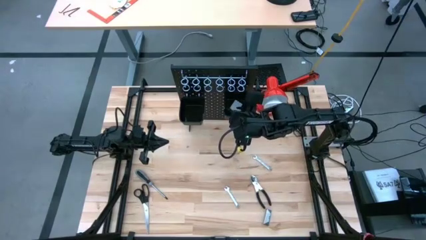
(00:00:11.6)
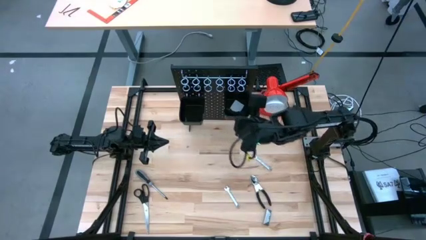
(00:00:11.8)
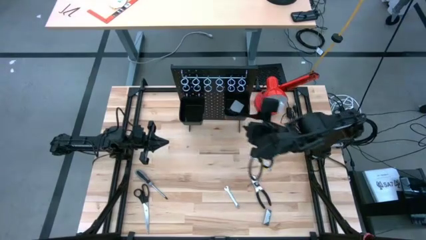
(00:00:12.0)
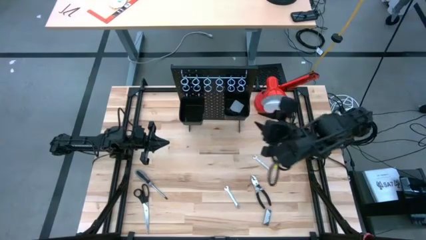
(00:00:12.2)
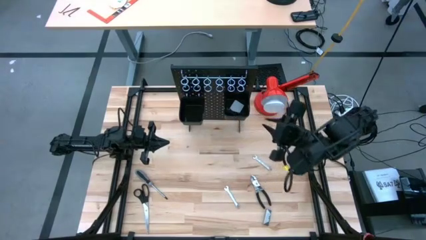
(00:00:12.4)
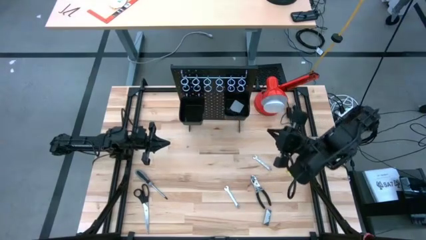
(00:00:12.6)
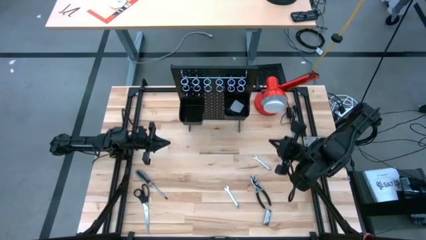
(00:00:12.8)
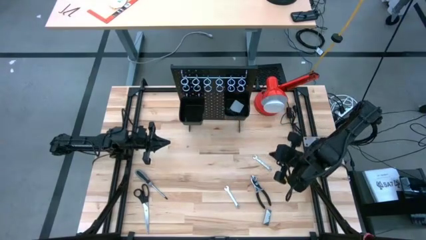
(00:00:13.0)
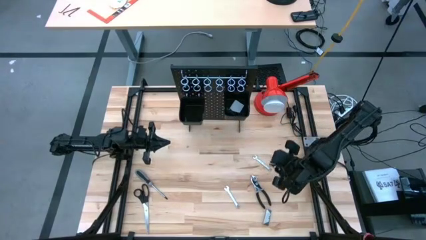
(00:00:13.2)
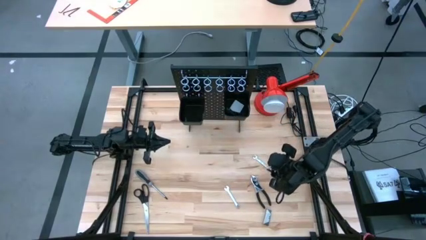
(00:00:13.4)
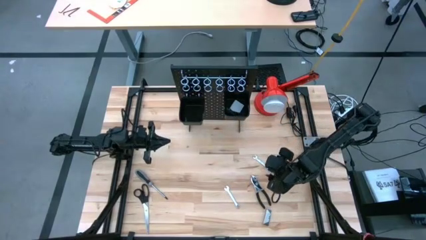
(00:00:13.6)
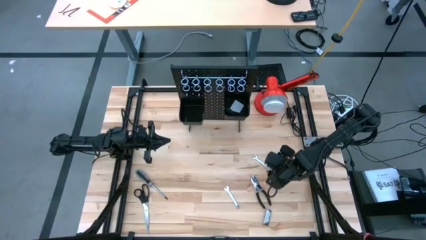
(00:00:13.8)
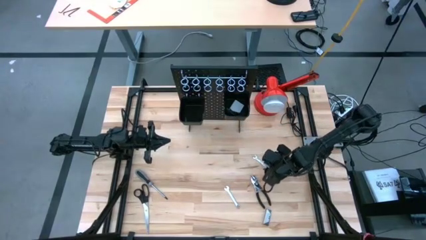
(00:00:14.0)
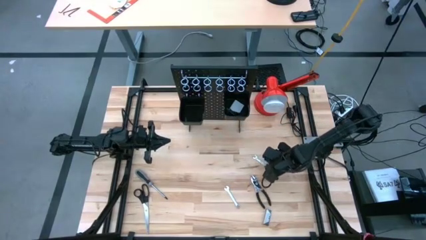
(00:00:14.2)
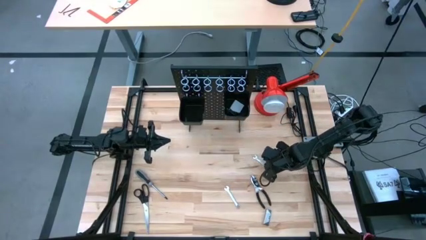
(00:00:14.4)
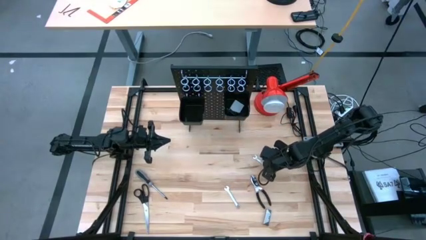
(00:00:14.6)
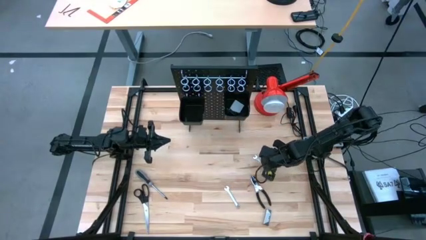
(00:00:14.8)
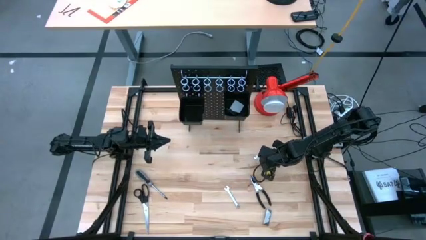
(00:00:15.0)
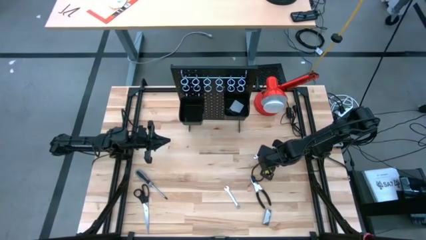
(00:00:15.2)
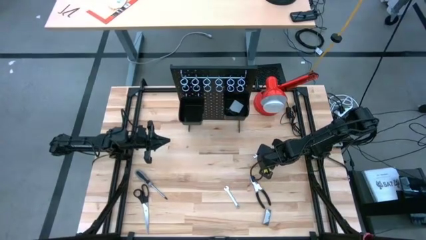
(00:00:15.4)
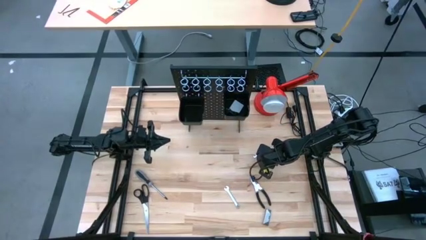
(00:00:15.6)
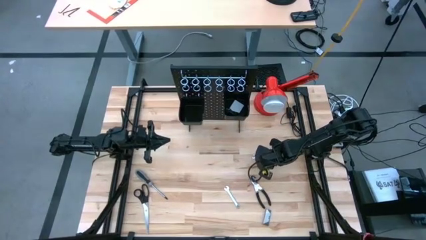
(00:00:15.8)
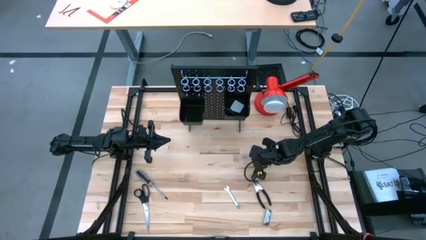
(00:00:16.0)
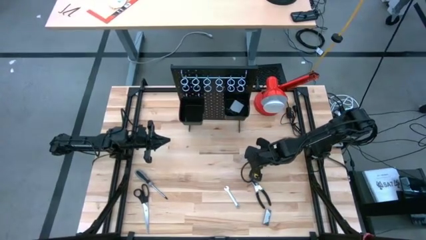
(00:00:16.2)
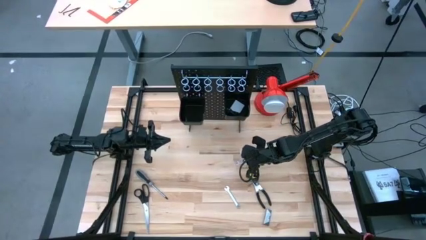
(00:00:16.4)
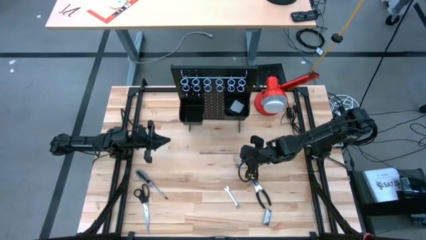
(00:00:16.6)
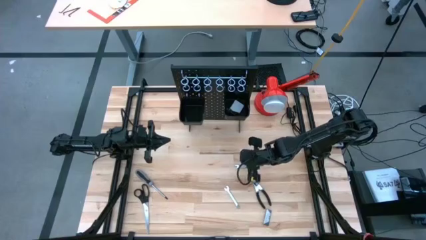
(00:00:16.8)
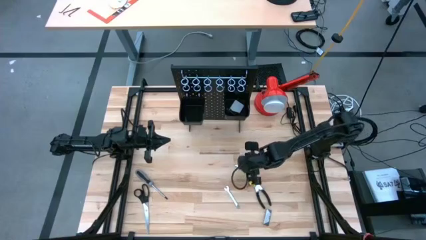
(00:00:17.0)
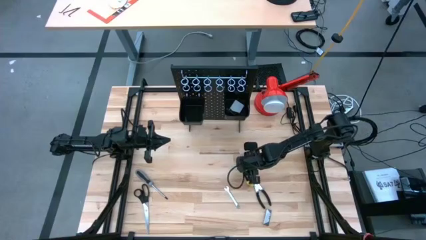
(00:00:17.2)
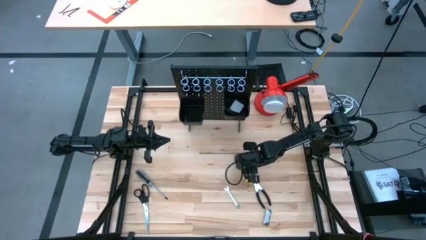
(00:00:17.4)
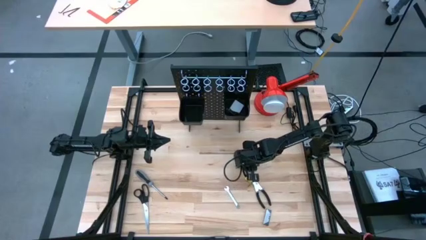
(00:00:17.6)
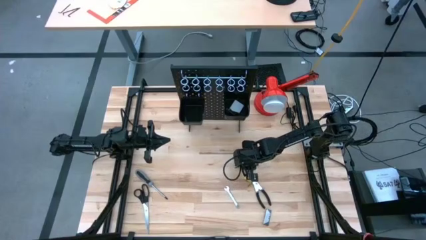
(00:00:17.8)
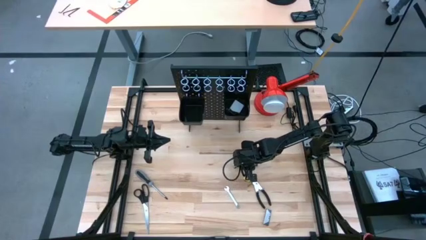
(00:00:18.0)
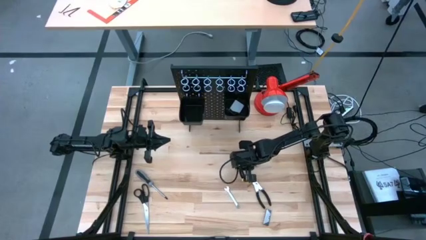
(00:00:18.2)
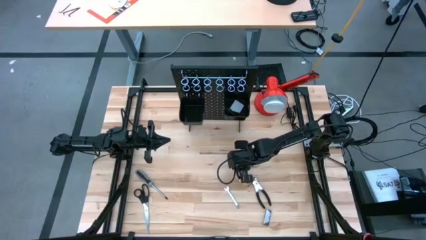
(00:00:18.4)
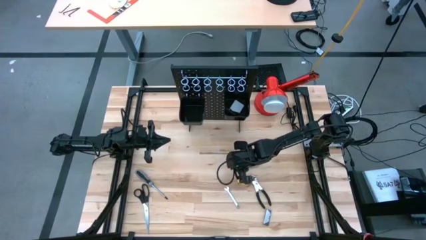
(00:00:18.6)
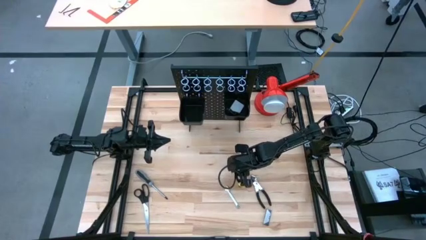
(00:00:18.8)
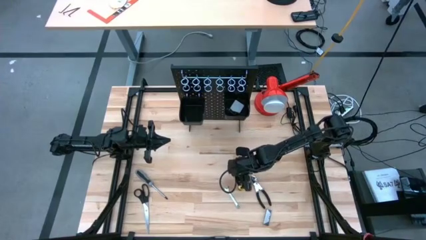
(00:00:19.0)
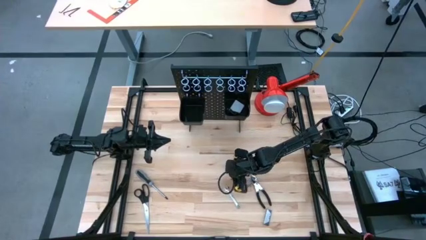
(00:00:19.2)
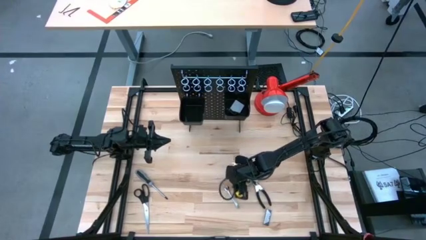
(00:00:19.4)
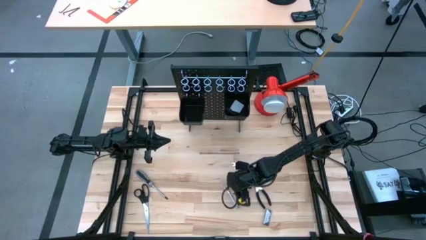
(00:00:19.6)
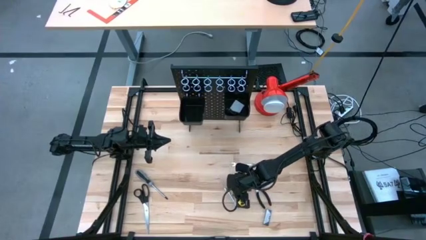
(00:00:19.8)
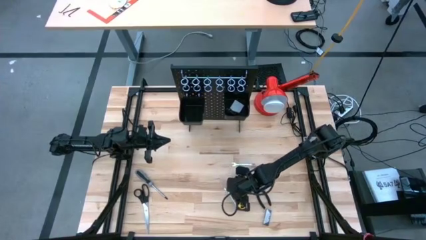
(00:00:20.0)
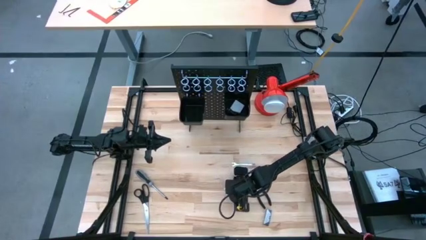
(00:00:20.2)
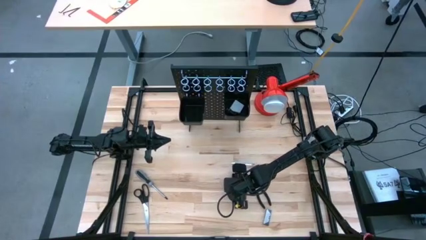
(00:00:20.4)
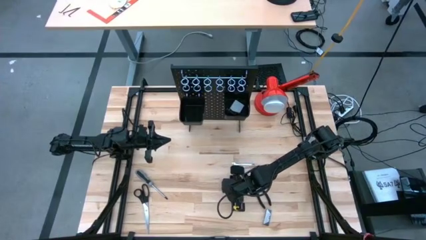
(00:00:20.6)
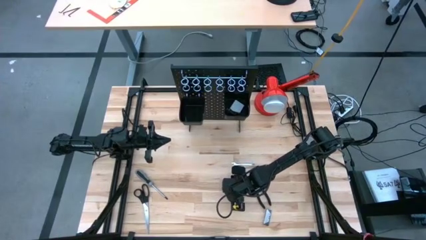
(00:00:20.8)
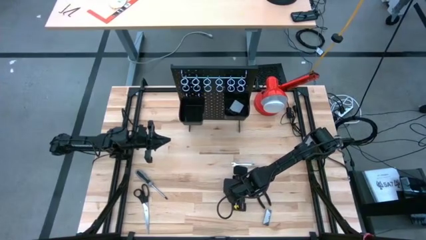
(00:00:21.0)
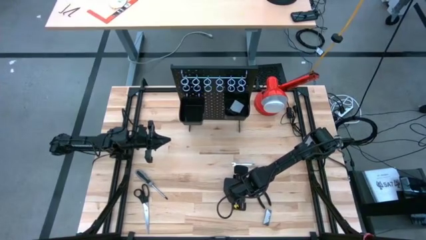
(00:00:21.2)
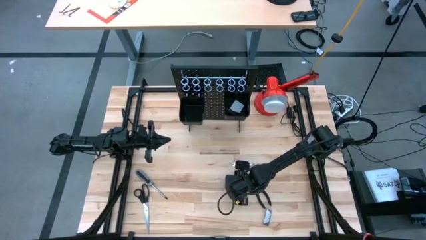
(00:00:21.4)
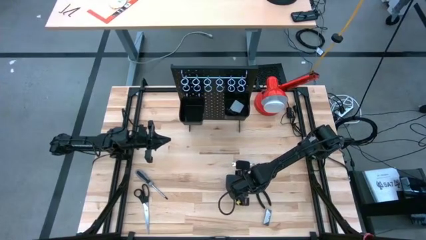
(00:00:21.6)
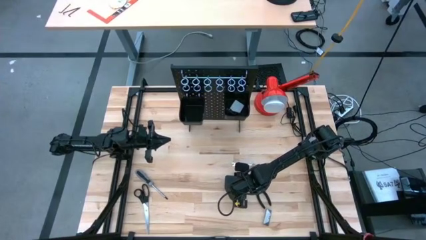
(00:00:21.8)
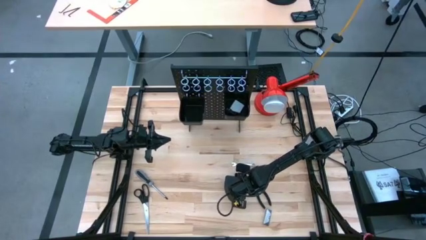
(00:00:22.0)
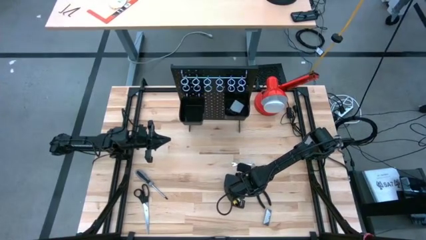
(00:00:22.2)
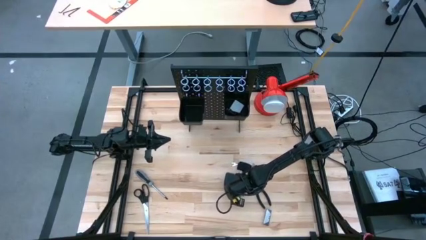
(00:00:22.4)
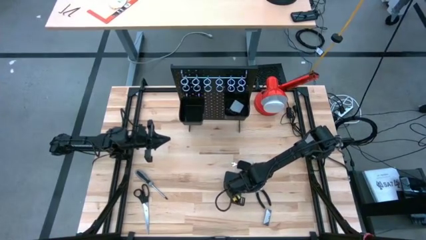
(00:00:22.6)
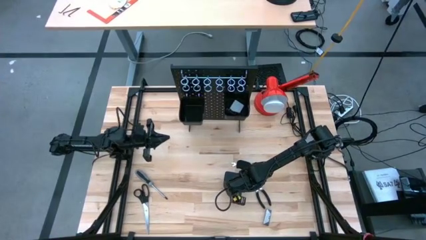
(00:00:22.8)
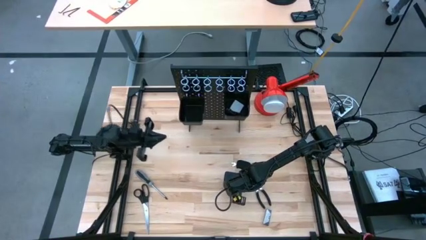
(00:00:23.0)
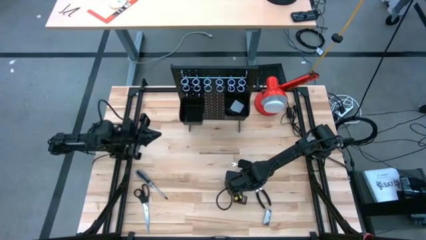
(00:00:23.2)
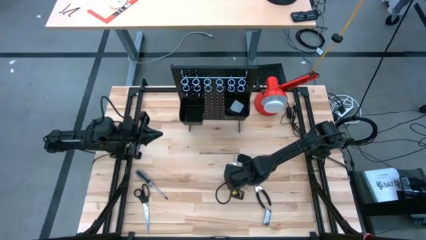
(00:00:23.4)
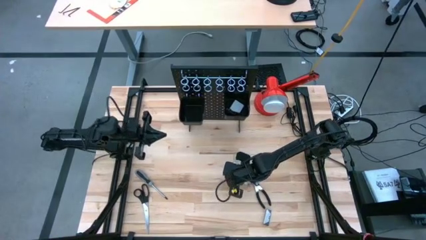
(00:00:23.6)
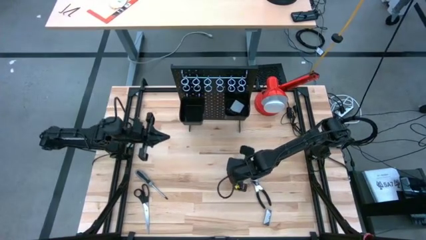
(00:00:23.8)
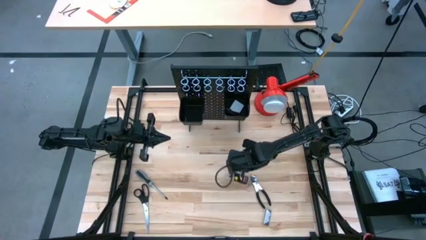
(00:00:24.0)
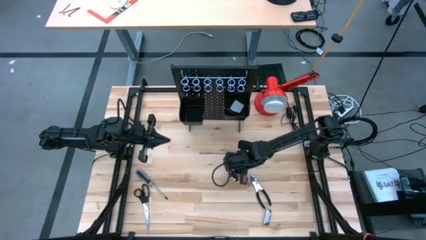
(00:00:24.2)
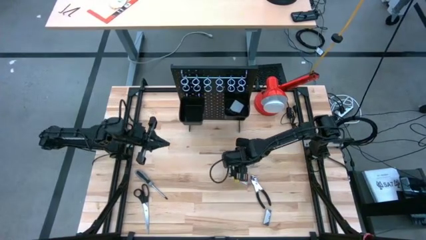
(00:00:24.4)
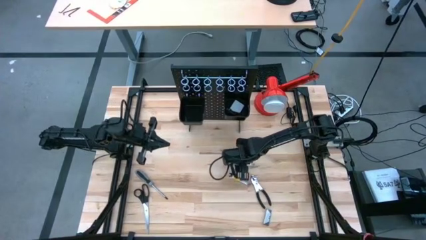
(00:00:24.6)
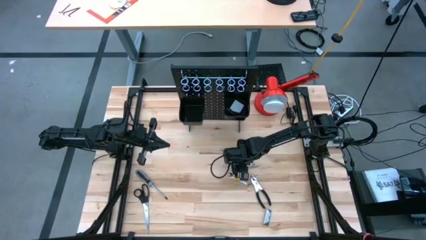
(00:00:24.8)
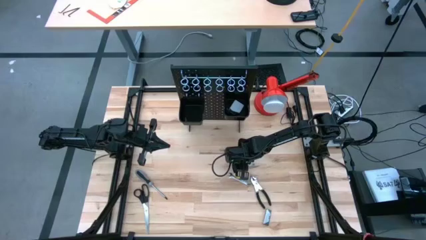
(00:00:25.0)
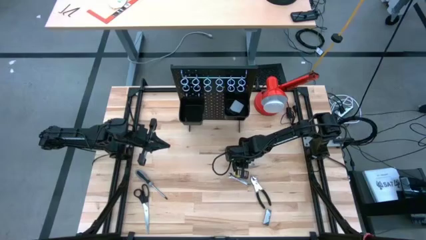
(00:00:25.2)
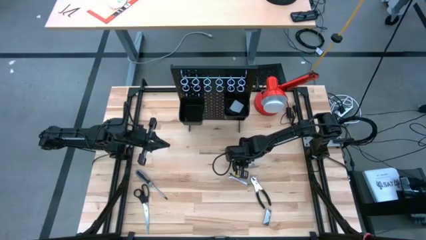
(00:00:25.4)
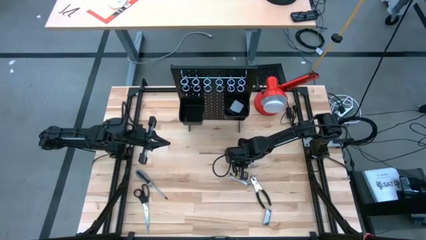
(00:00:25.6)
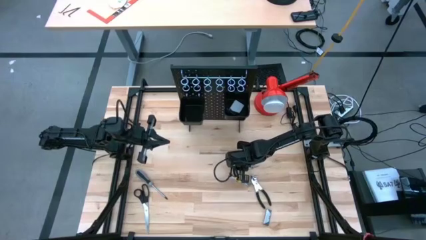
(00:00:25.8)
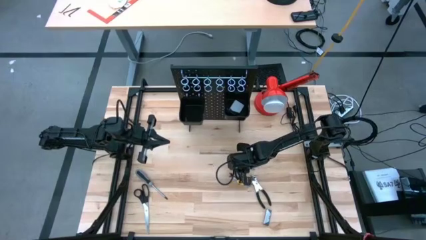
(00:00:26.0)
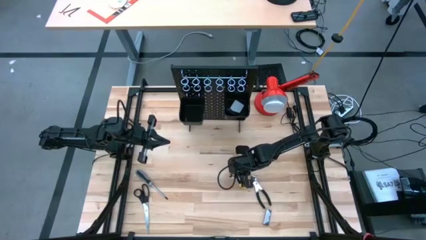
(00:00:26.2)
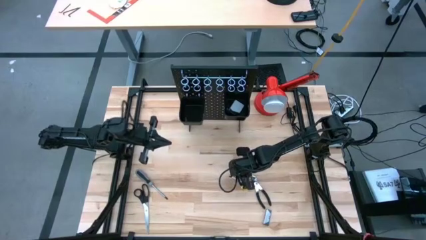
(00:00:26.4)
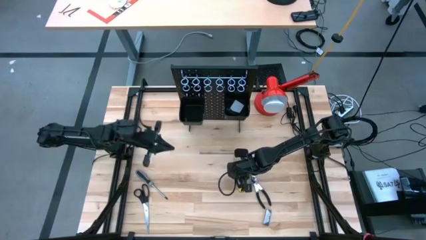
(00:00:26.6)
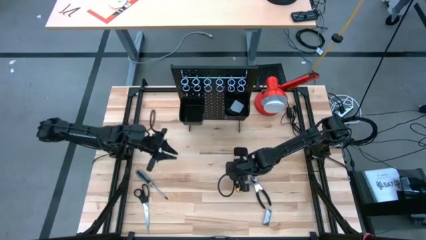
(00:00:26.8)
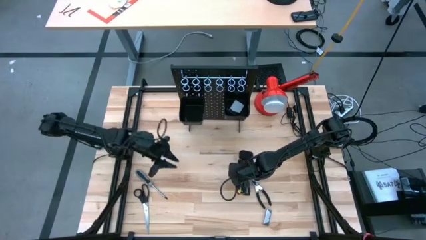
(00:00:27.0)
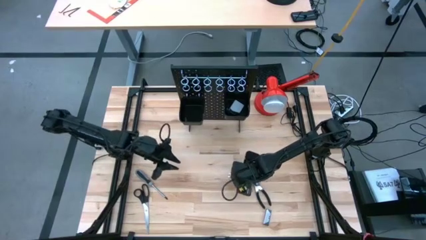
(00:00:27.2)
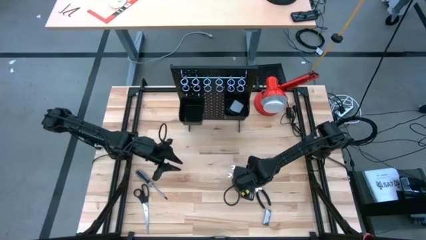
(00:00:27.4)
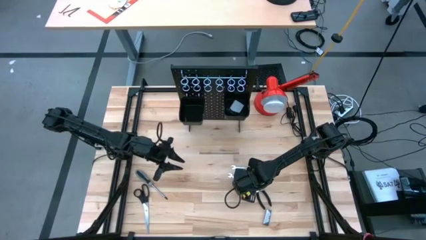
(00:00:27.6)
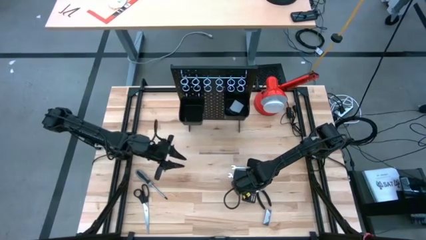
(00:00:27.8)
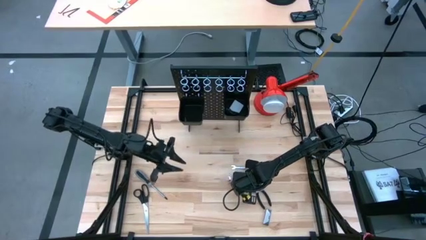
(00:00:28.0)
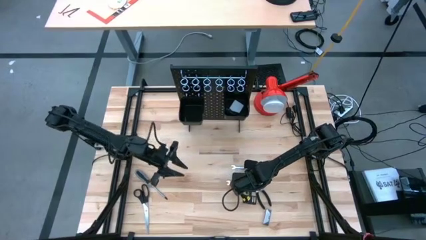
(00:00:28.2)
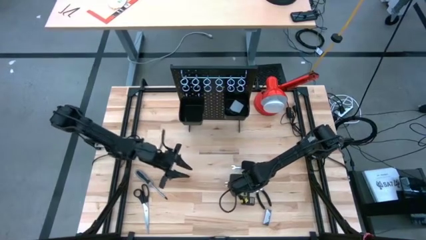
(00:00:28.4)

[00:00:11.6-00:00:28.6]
Task: Hang tools onto peg board
Hang the bottom wrench on the pegboard
